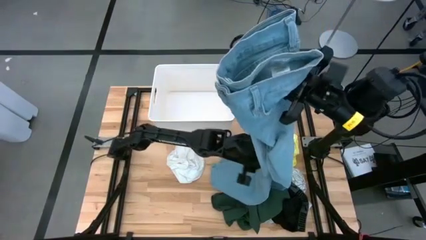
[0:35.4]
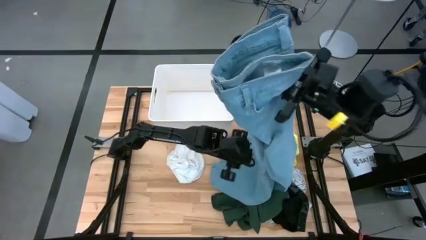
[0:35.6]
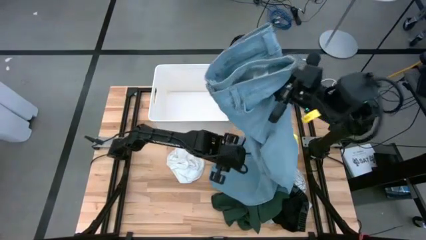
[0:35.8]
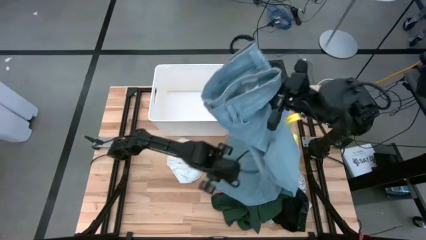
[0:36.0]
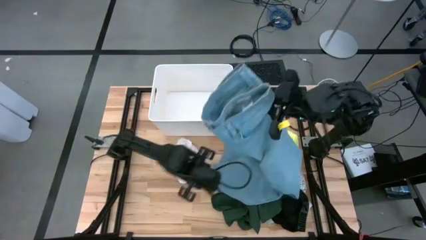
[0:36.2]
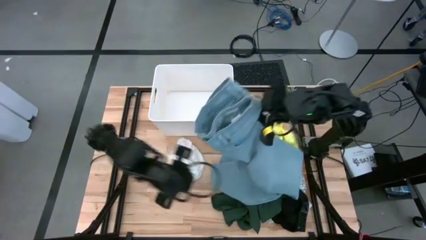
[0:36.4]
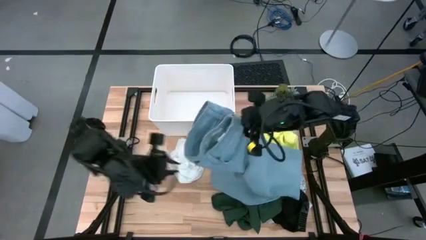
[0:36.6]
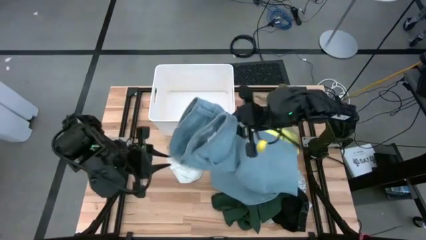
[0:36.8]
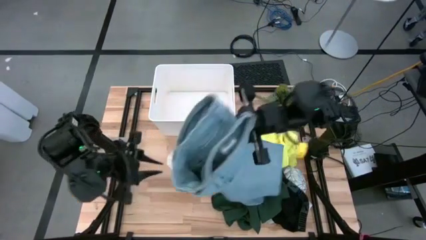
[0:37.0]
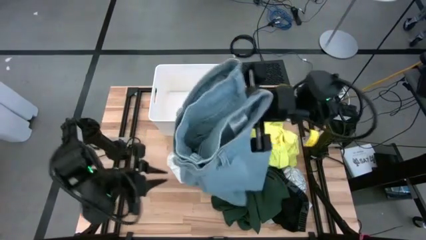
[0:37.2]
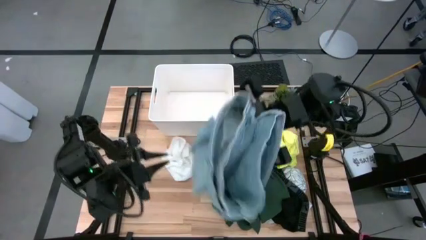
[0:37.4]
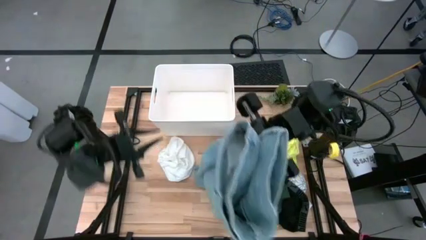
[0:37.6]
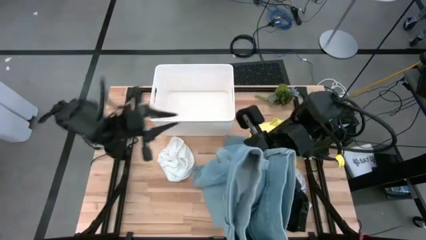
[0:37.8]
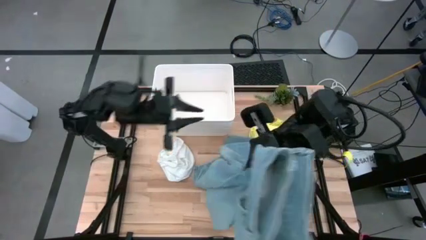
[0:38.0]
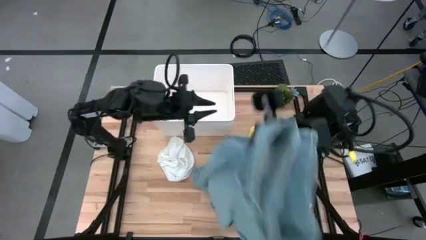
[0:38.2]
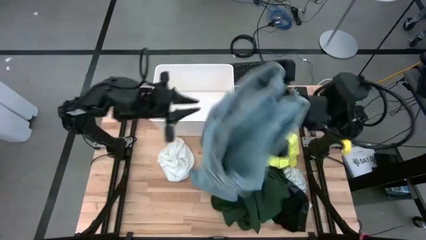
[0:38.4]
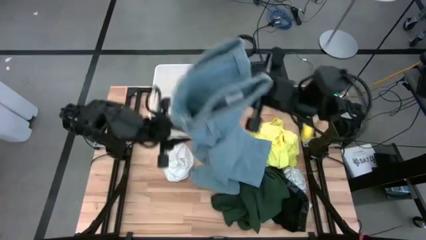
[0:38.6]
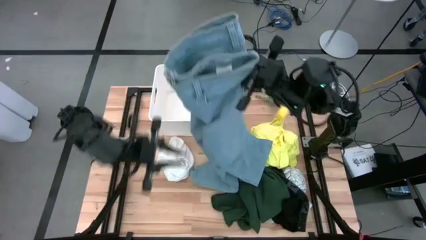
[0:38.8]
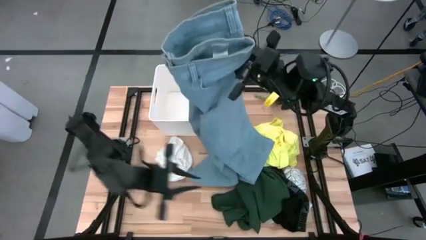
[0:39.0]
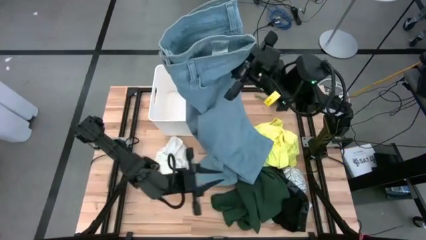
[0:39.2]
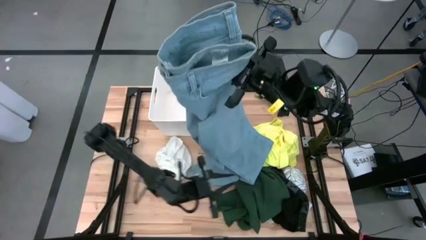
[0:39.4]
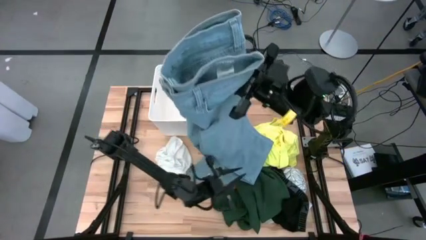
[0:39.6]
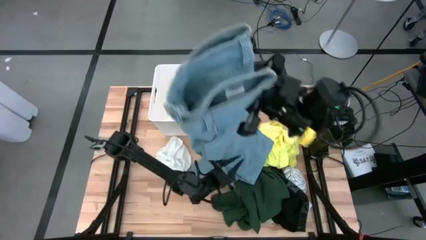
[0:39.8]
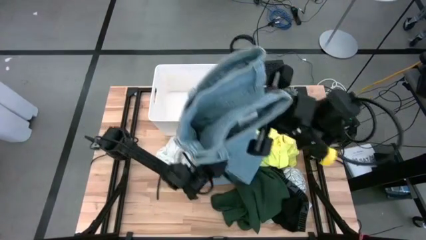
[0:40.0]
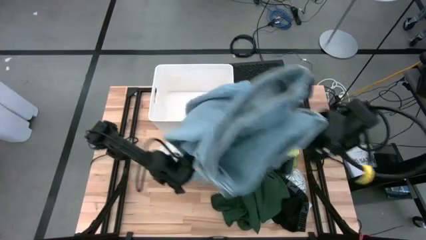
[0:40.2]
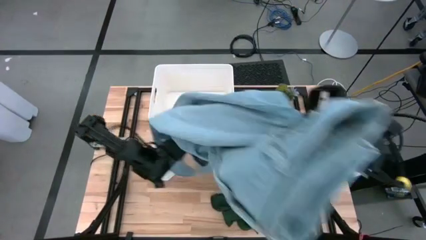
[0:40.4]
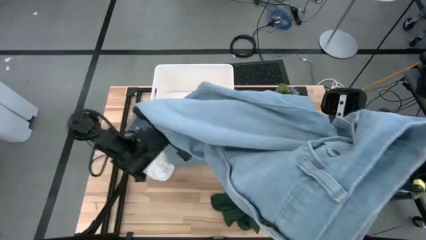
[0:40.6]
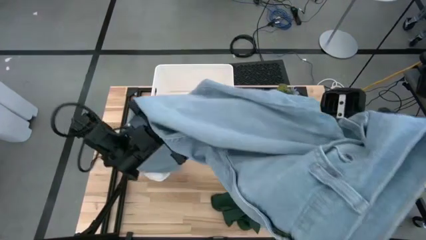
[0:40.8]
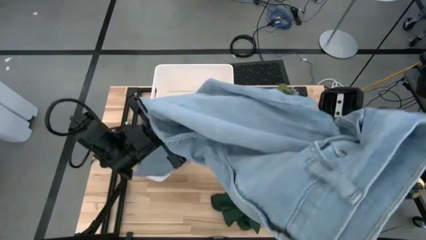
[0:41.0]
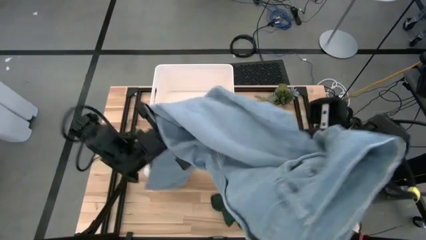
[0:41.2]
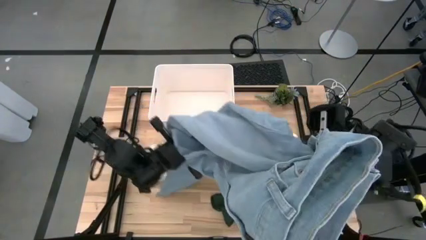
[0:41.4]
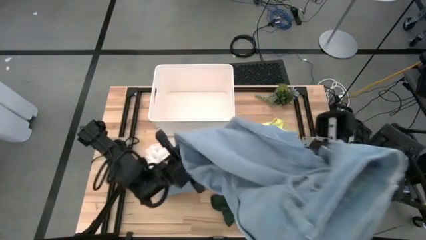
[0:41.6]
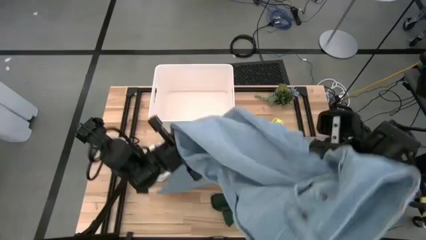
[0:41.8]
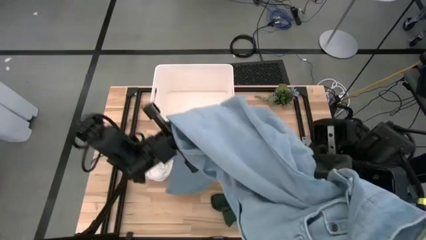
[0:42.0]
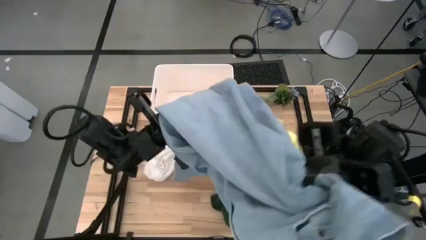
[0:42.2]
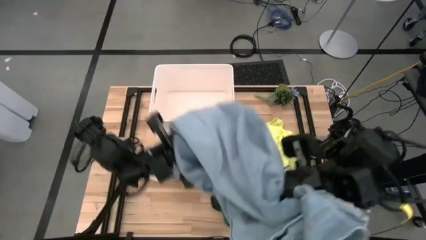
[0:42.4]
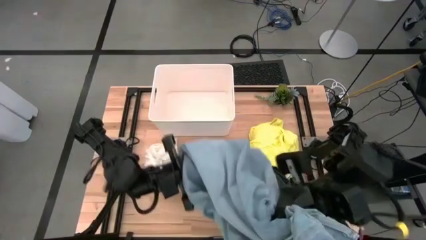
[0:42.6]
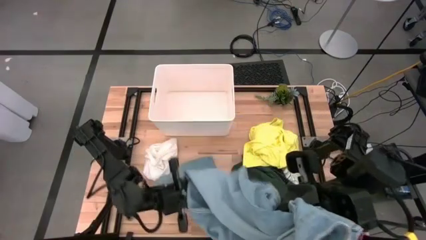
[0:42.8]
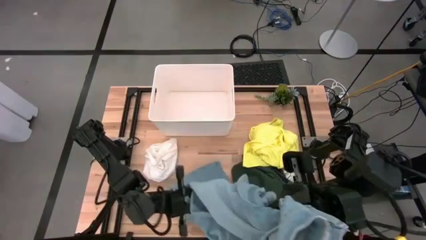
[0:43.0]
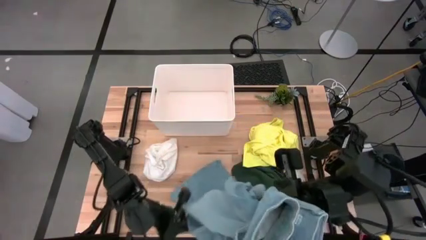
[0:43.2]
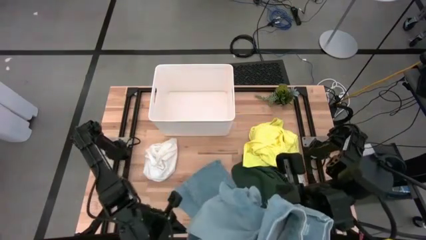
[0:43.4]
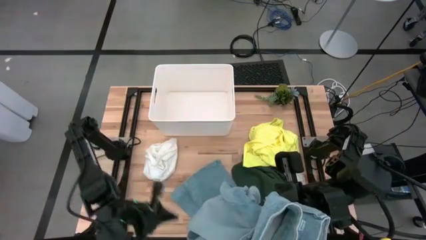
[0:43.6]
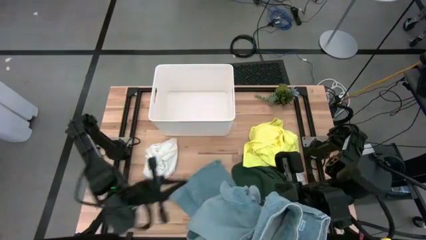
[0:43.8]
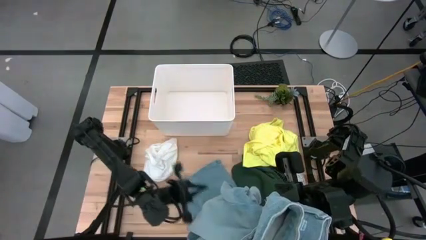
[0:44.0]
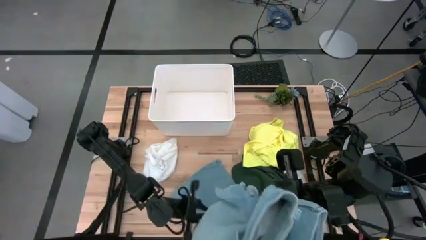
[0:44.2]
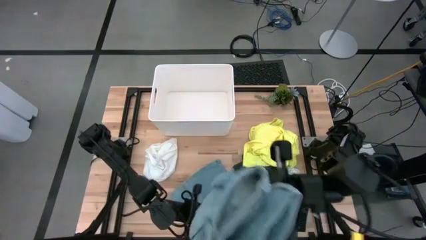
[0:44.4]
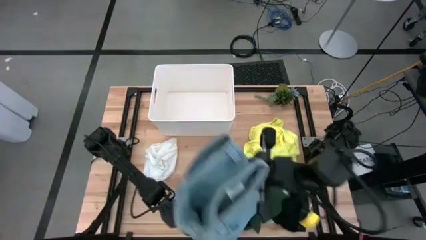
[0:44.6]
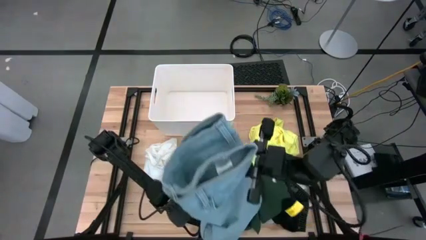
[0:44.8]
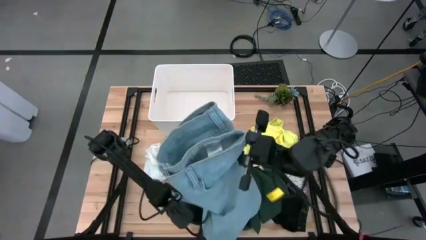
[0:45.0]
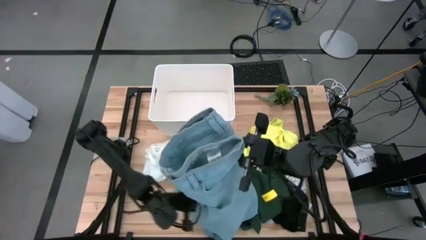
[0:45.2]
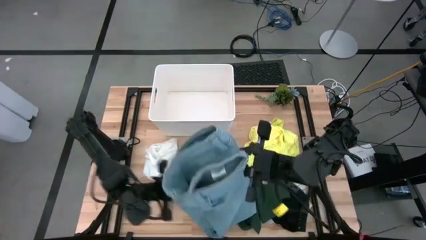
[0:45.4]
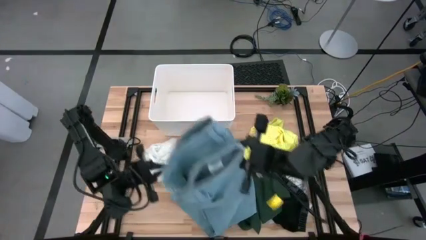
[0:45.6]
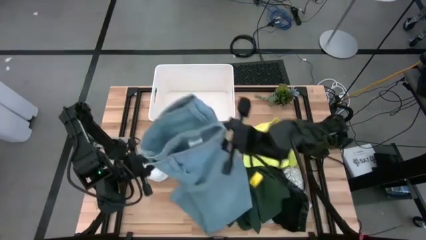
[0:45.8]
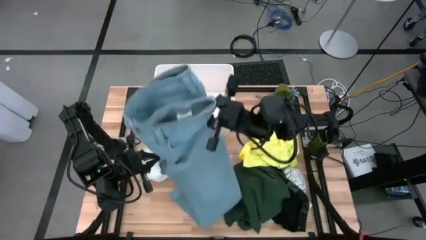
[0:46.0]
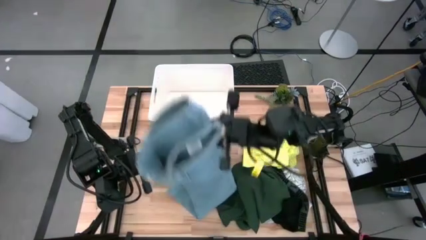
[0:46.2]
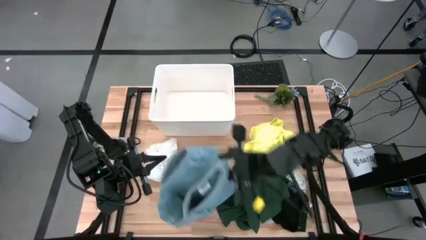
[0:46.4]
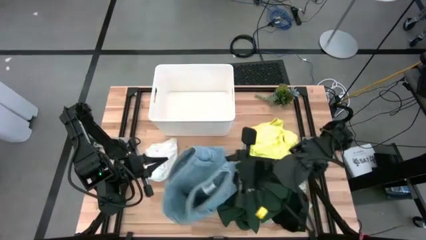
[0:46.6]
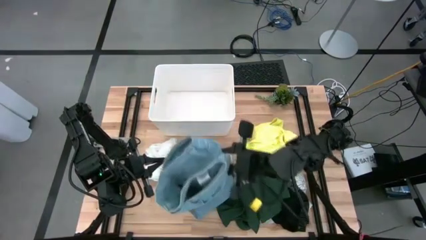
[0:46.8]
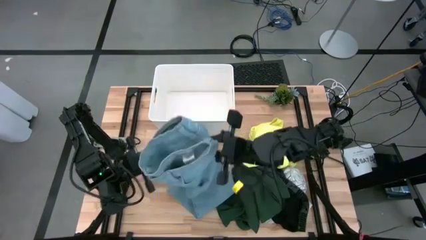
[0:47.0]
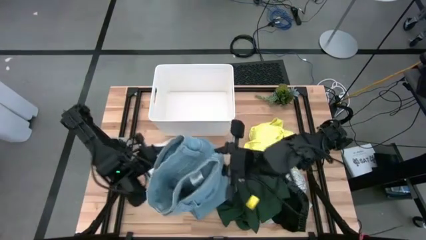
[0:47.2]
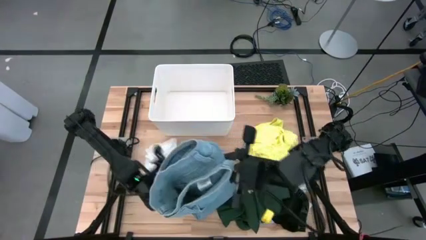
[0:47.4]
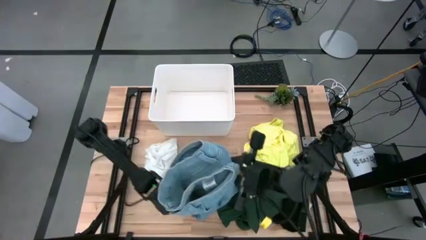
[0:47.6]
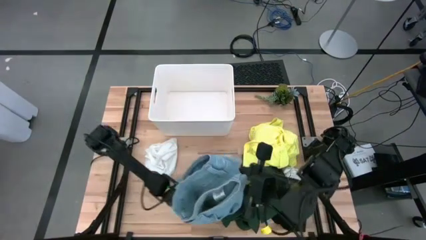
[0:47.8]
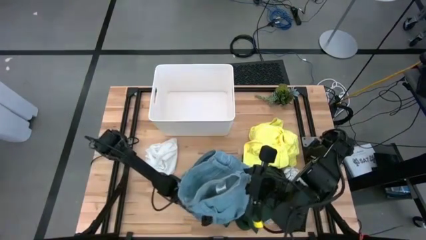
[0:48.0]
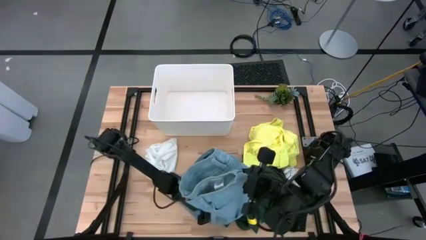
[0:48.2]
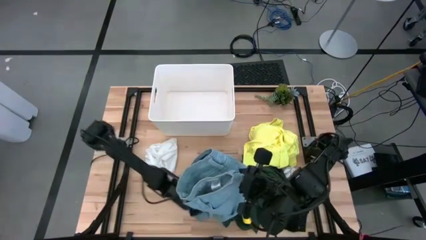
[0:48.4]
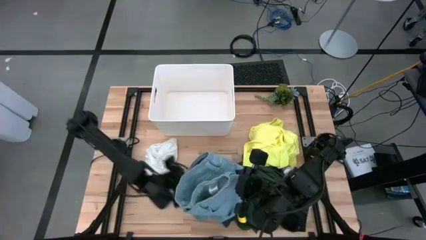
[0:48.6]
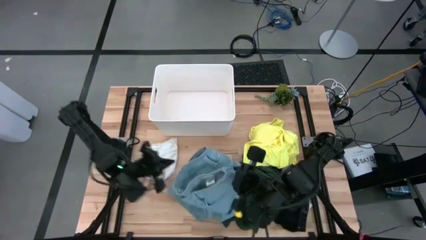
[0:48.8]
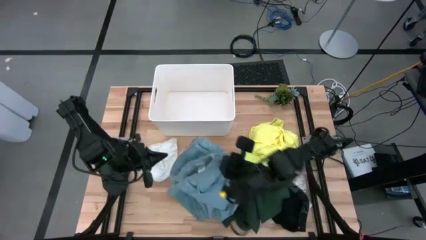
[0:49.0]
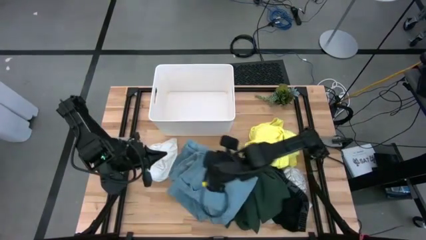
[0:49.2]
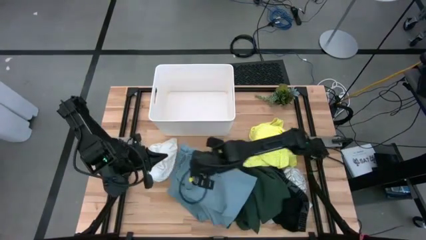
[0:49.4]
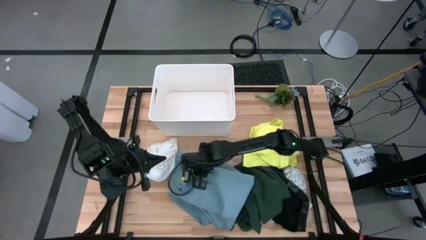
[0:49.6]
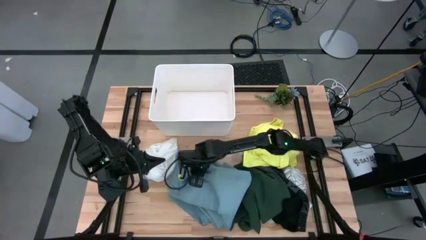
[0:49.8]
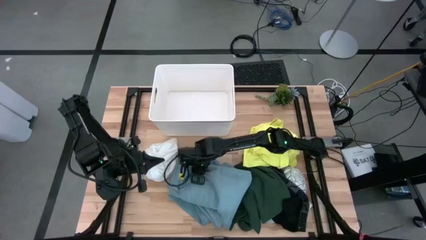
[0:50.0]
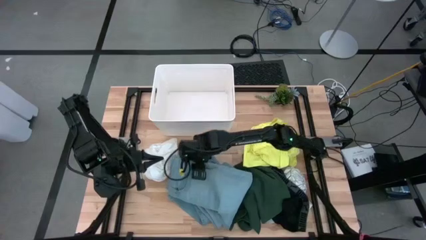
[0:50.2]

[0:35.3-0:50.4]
Task: Fold laundry
Fold the blue pants

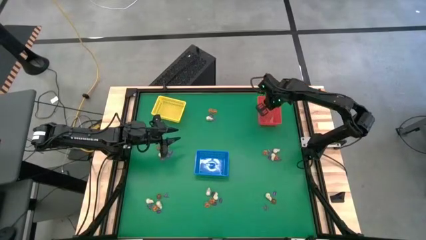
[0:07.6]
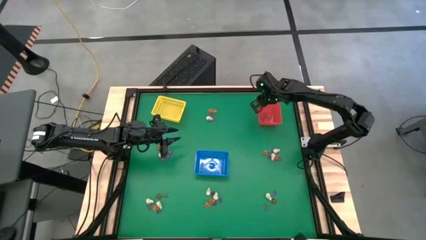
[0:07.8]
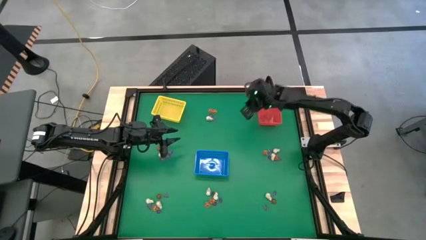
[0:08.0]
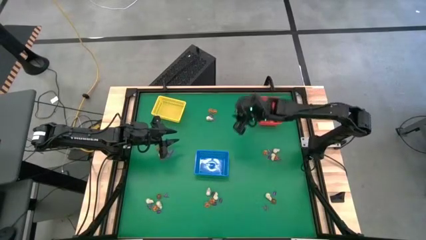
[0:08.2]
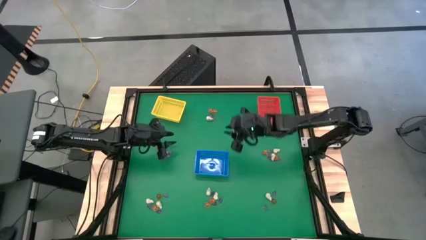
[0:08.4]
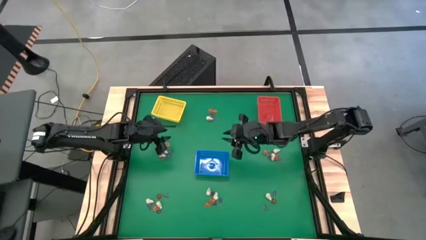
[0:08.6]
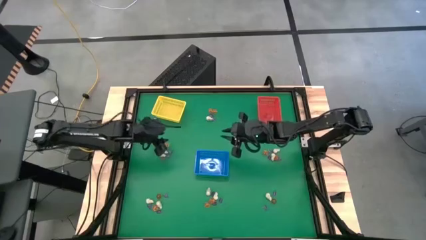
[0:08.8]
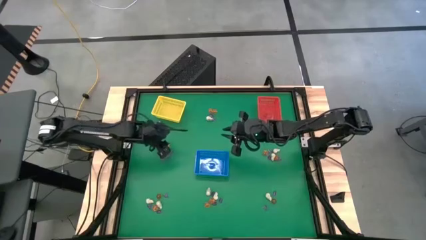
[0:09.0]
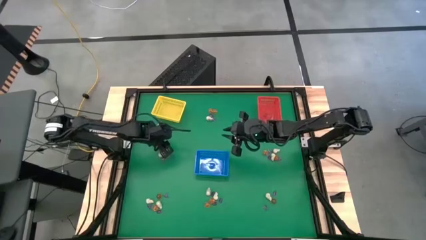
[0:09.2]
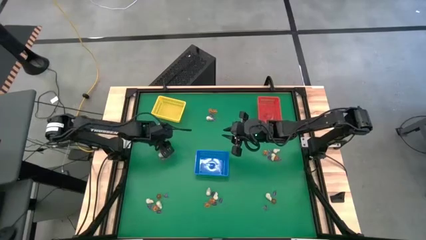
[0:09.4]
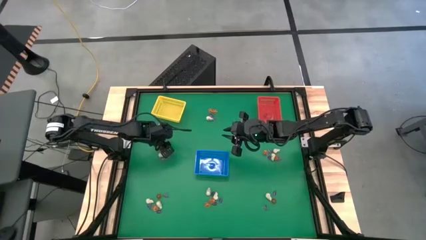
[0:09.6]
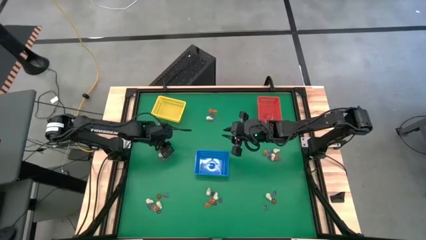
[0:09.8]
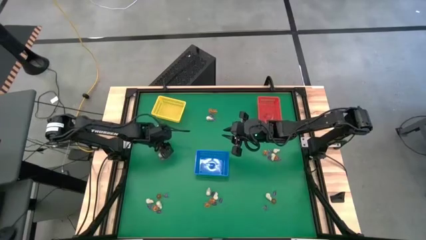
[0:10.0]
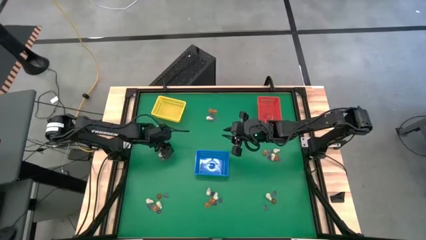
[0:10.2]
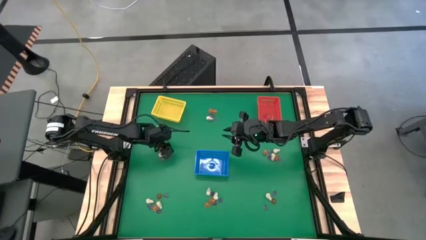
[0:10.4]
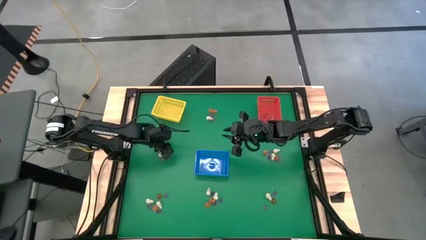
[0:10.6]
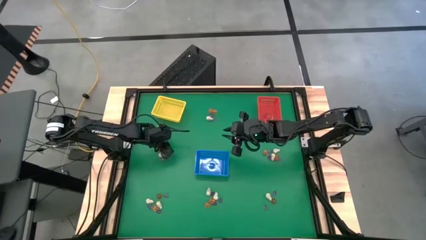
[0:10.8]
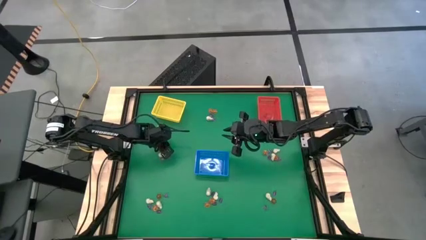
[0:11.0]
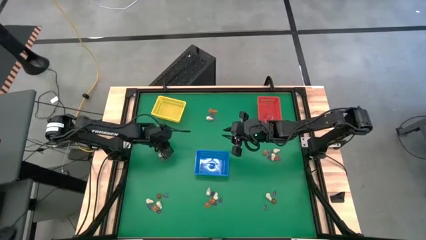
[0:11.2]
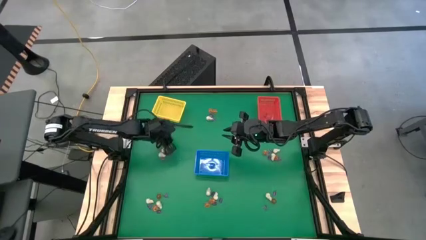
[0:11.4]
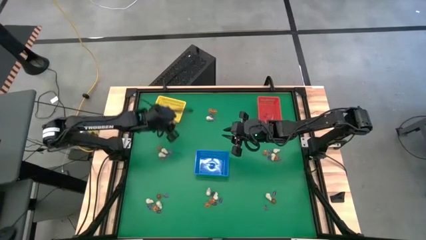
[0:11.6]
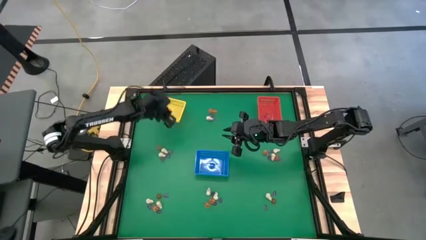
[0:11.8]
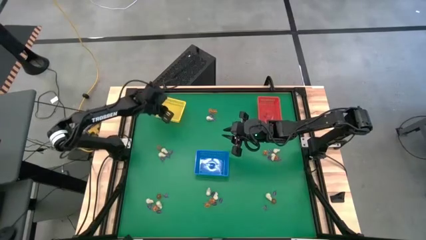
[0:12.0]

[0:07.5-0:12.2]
Task: Sort Halloween decoration
Put the orange pumpkin toy into the yellow bin
